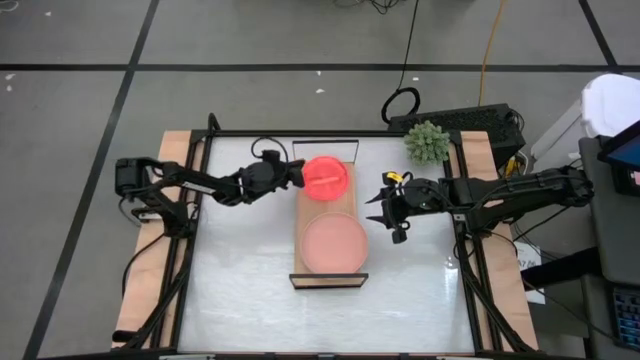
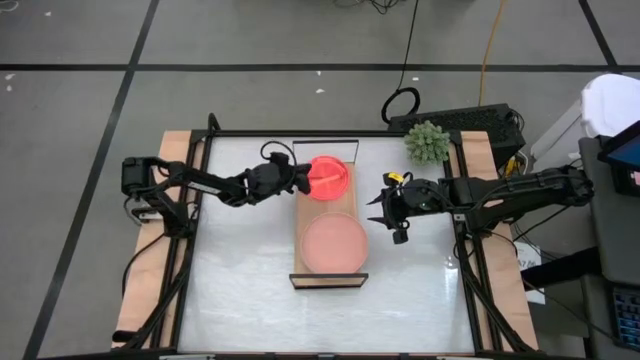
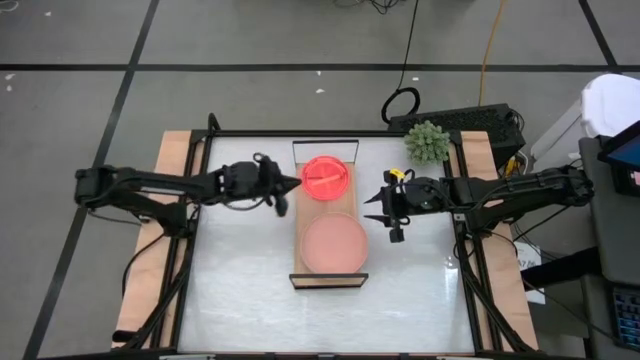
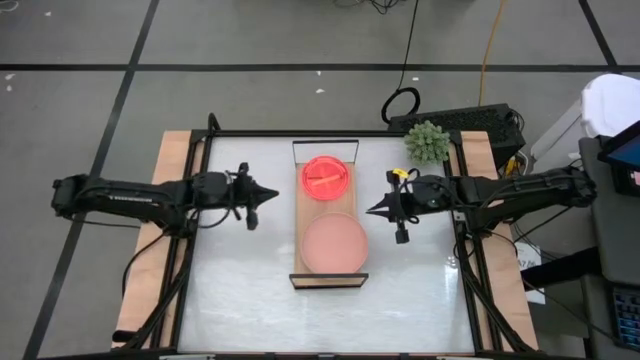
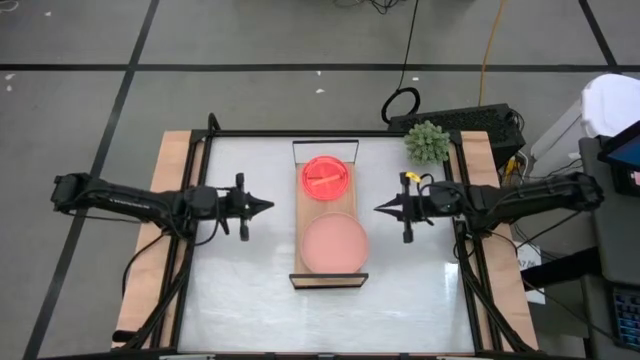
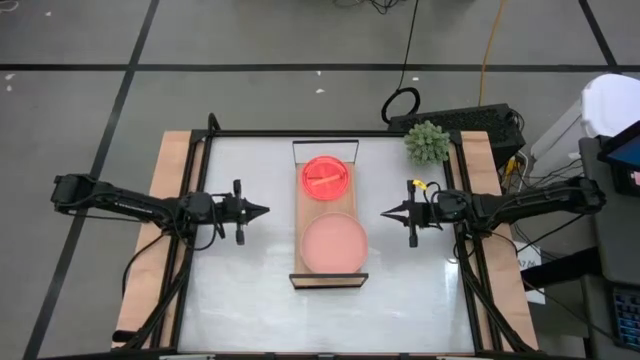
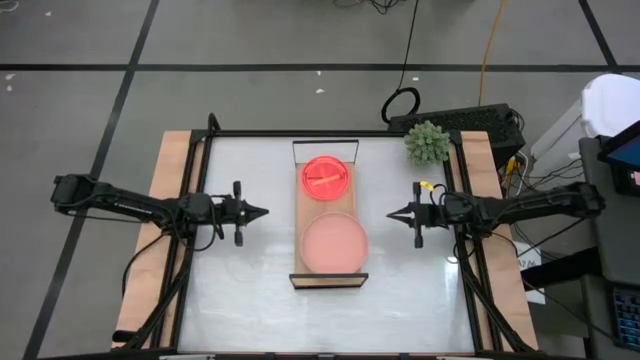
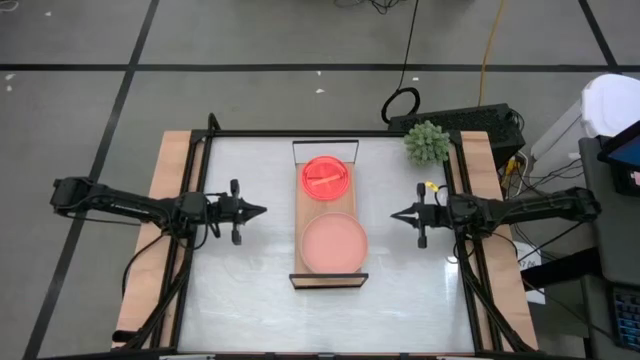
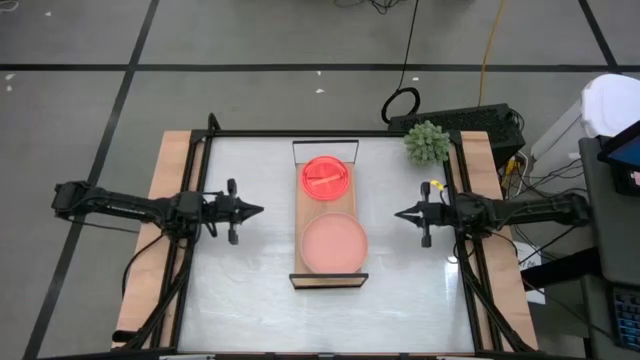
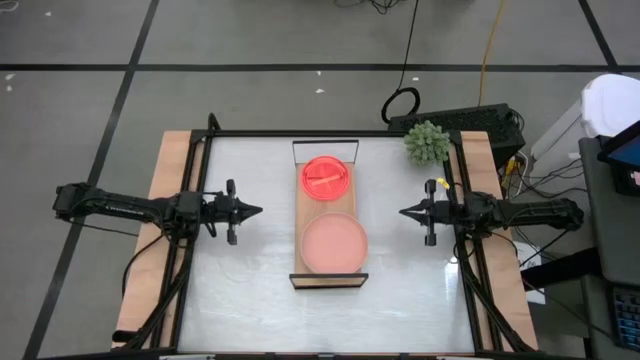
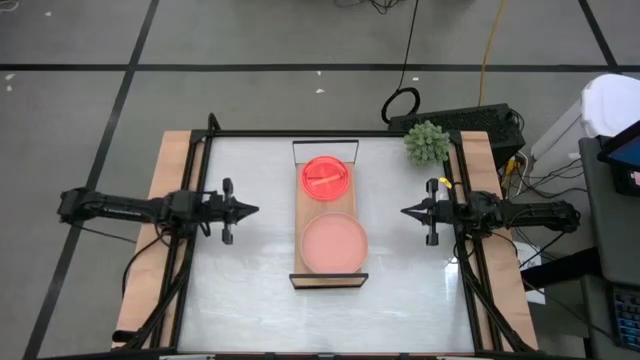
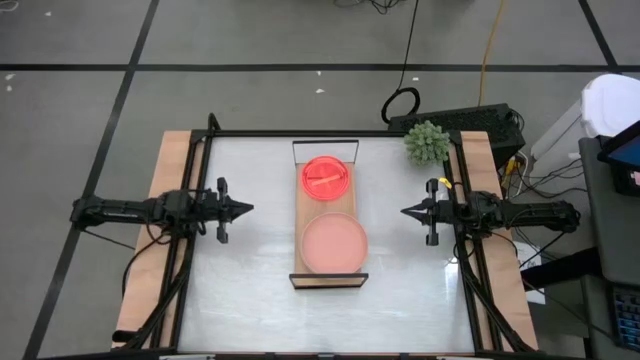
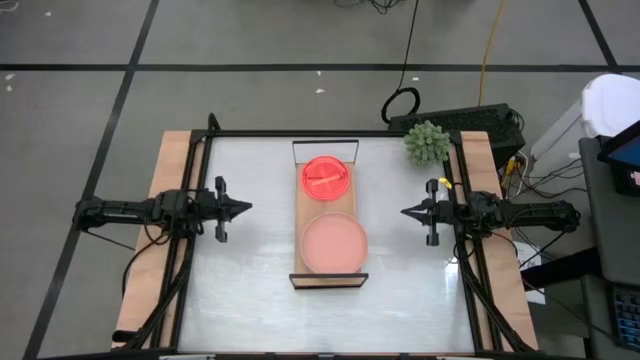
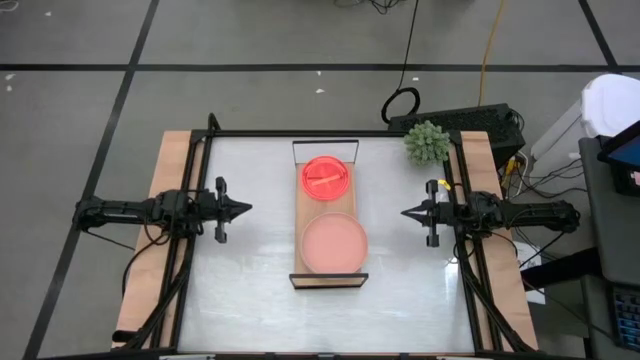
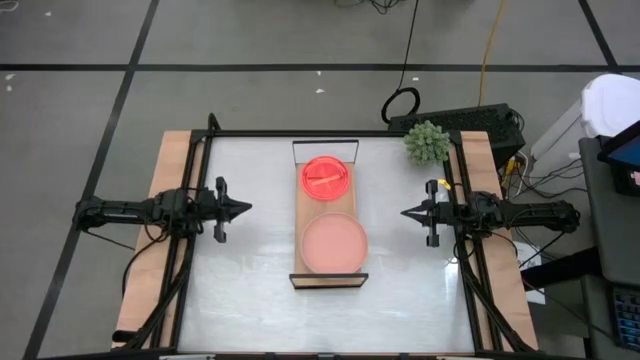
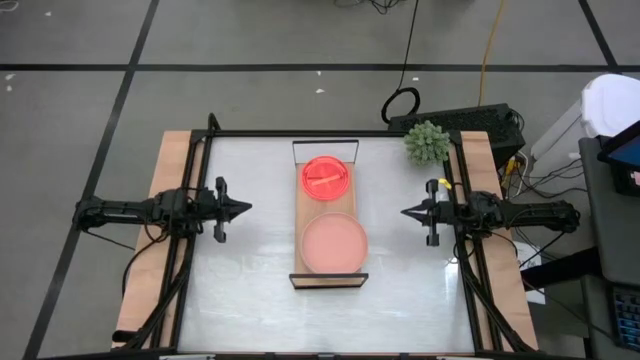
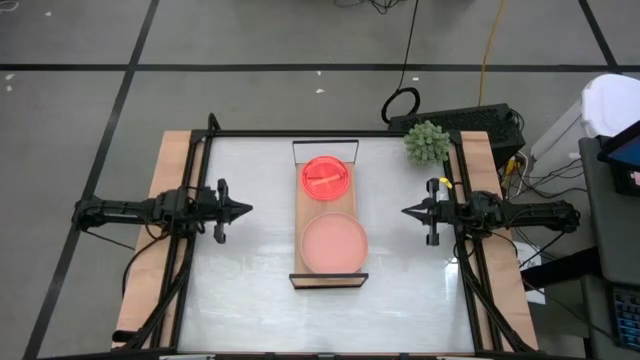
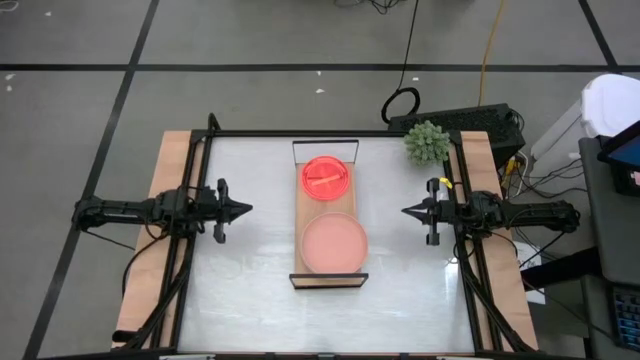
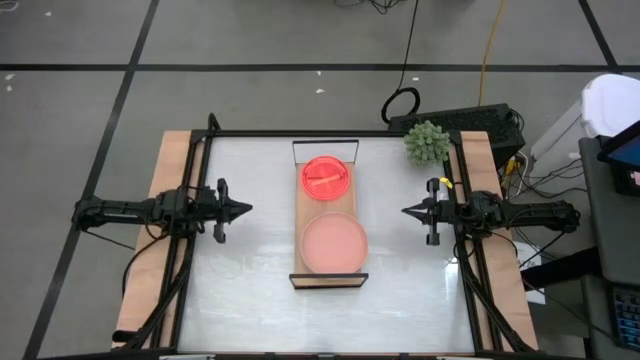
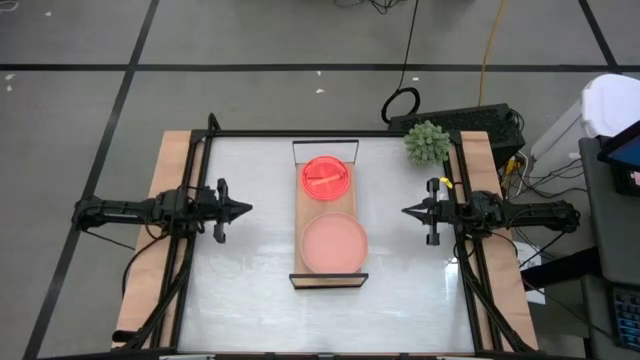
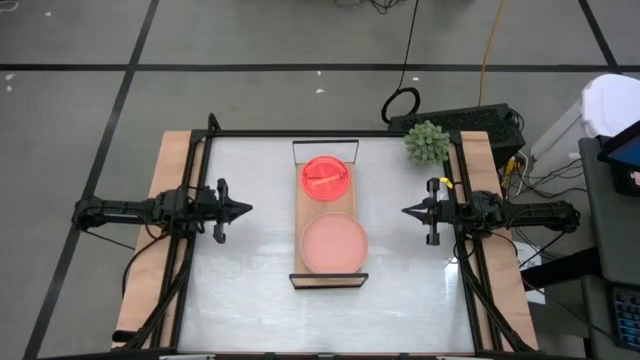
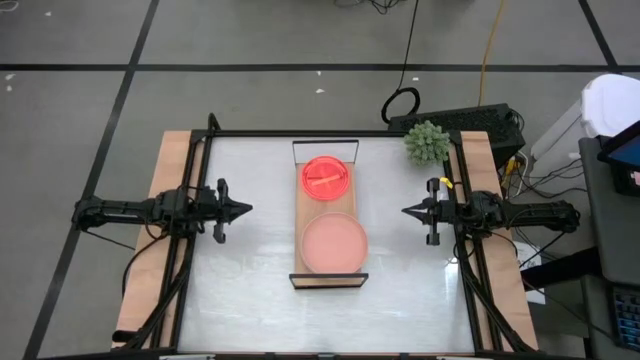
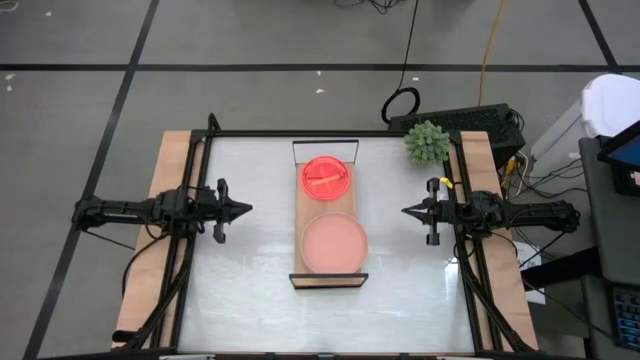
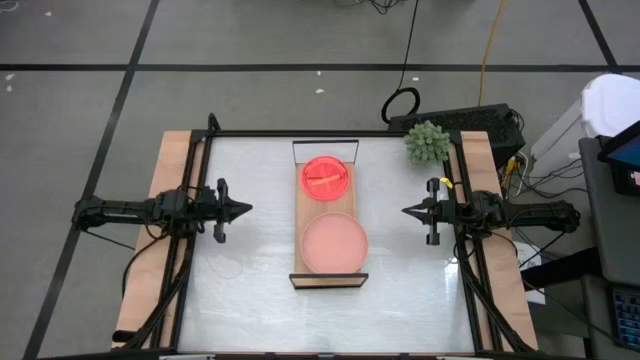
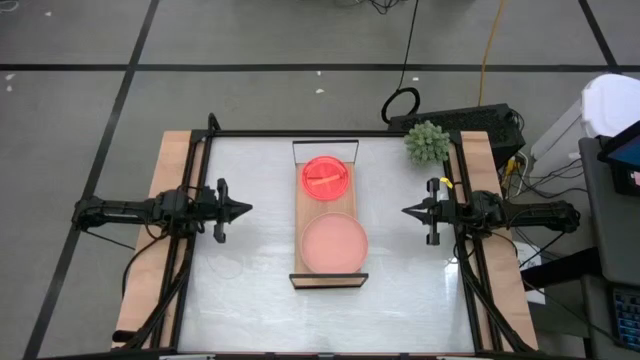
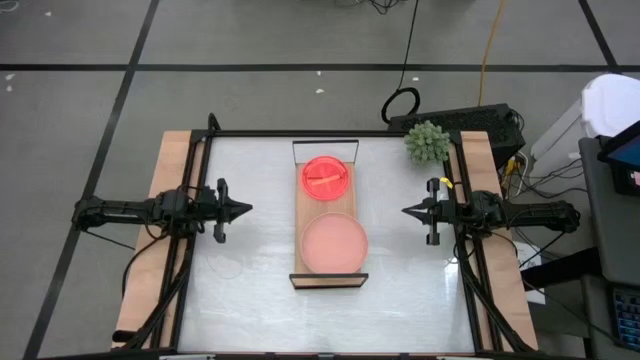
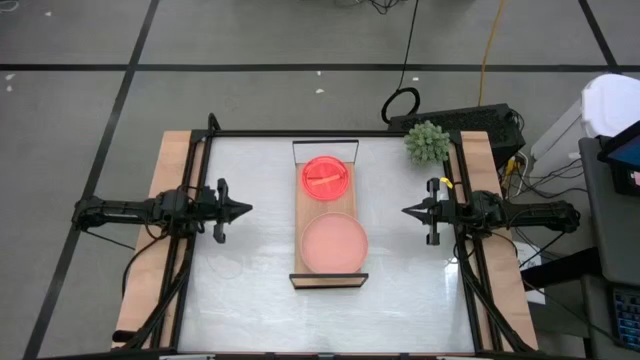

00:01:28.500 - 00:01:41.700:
Task: Place and stack plates onto a shelf
Return to Home Position

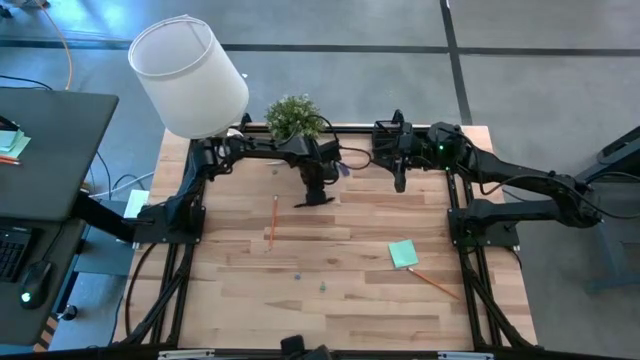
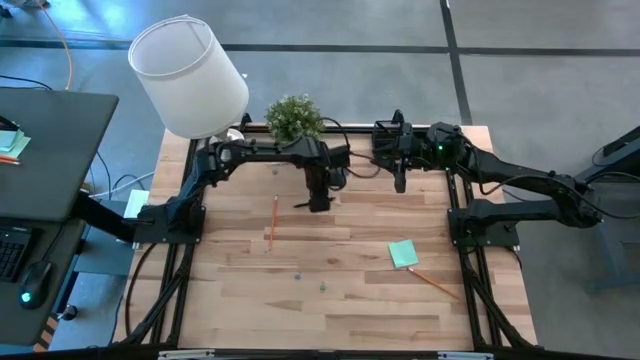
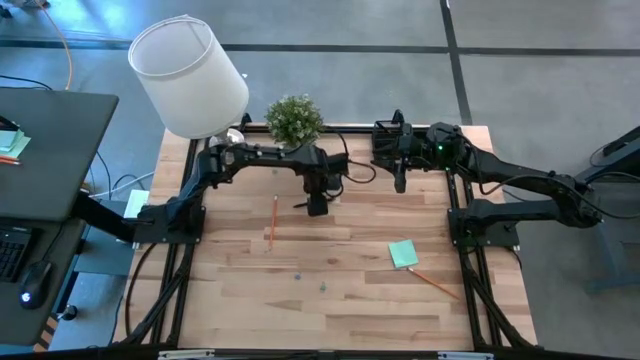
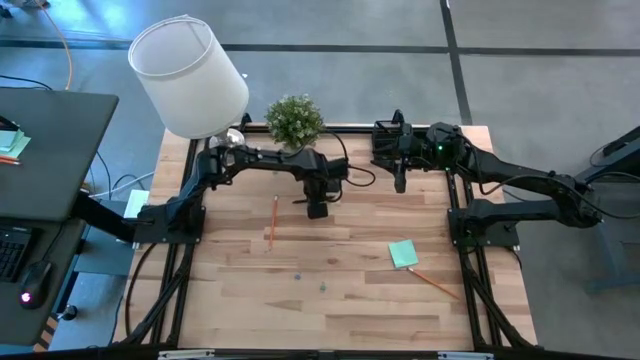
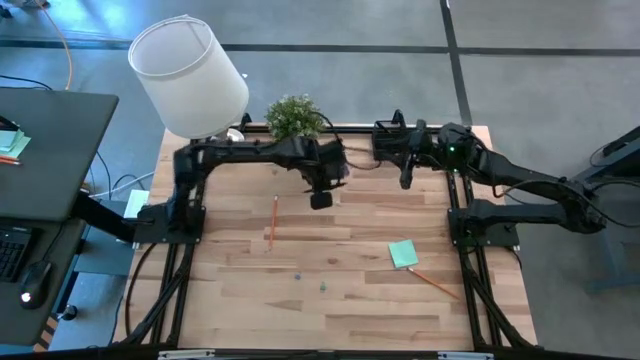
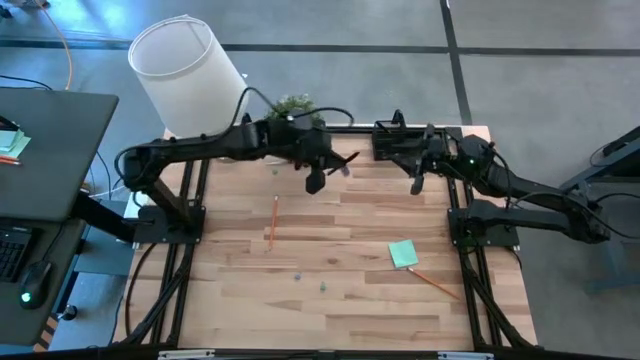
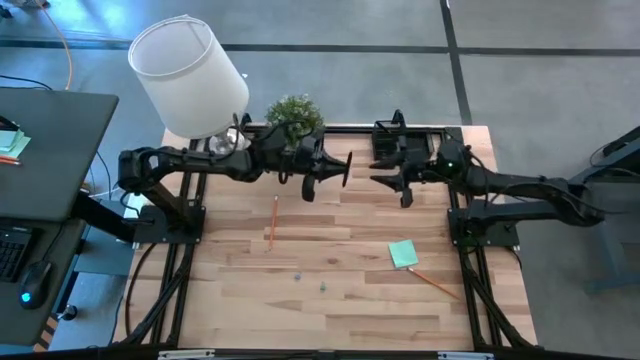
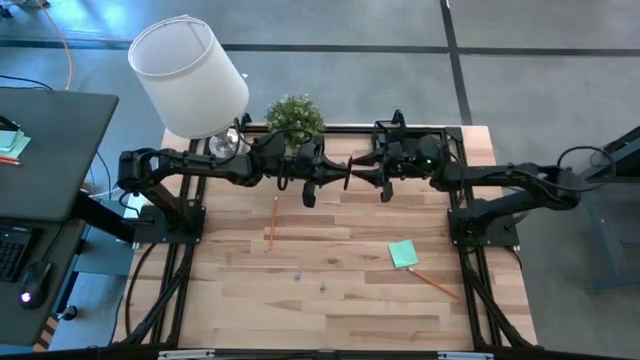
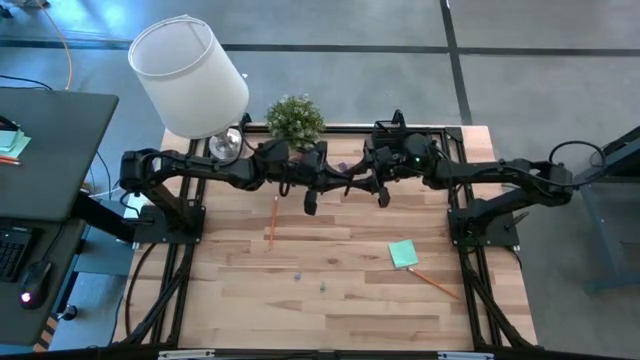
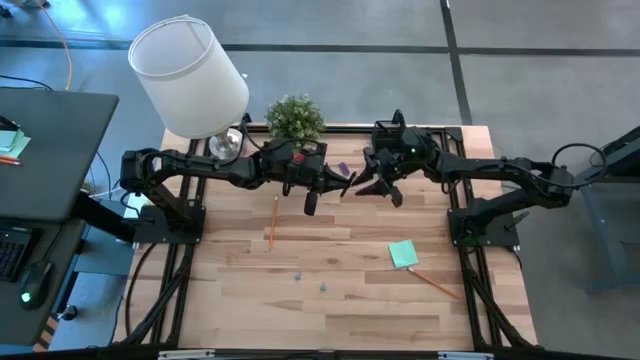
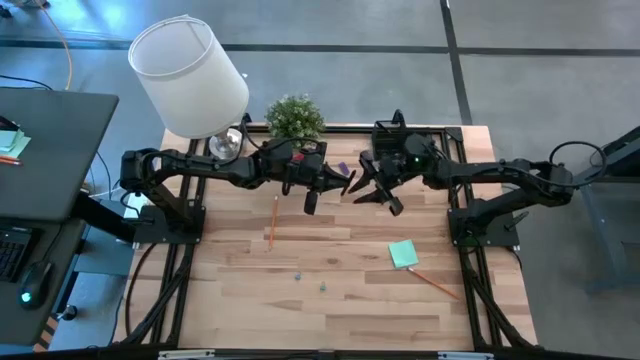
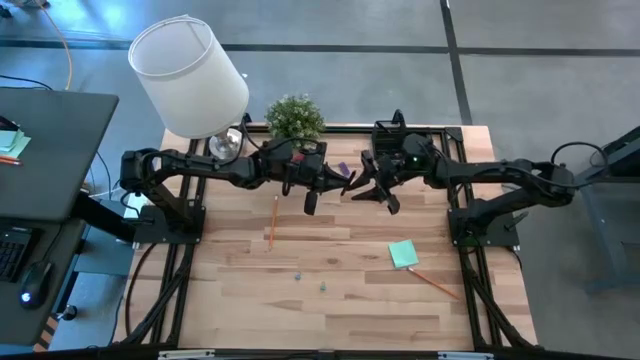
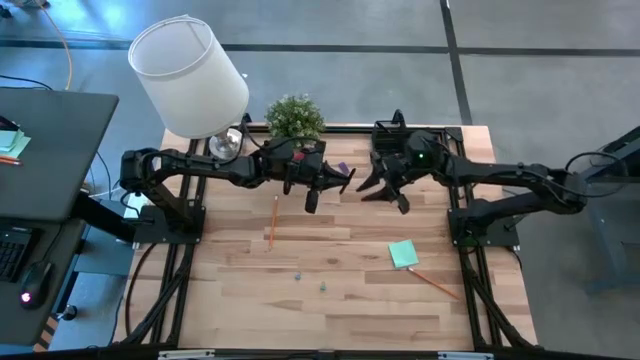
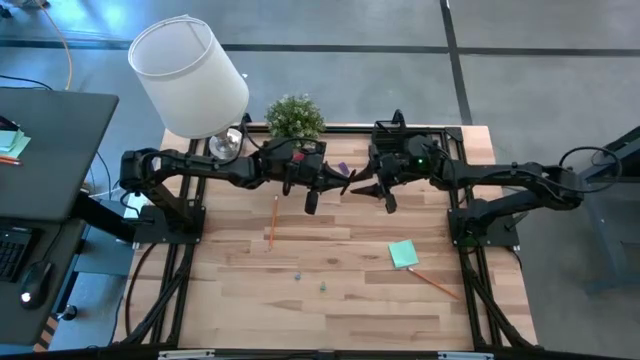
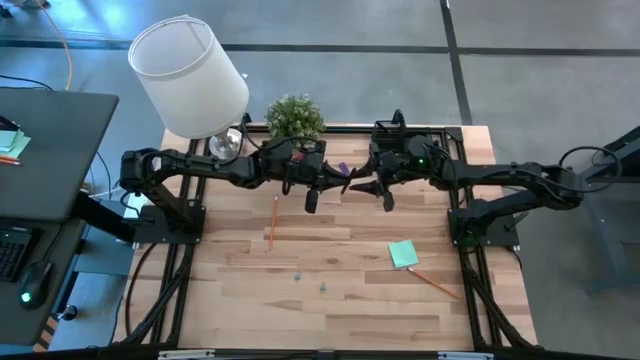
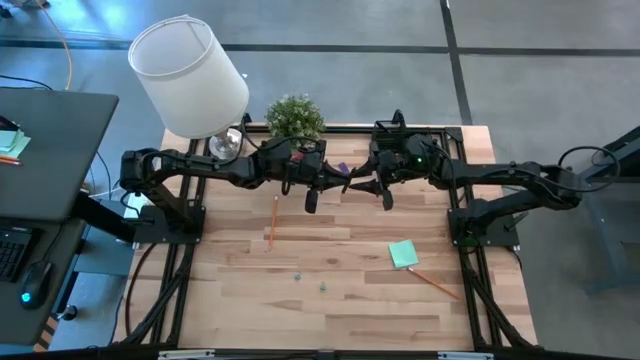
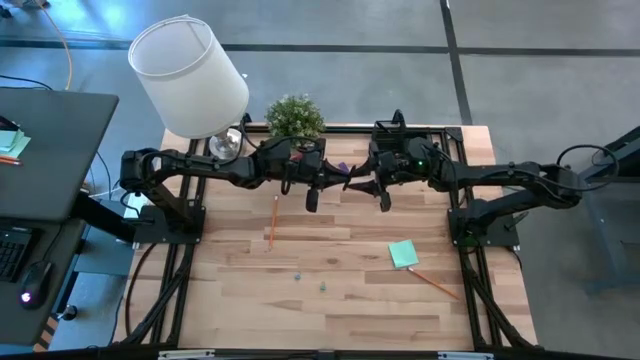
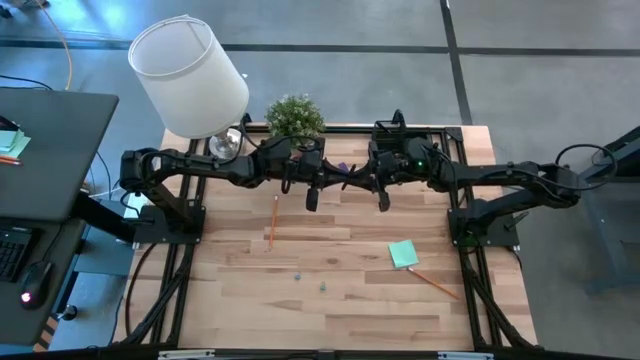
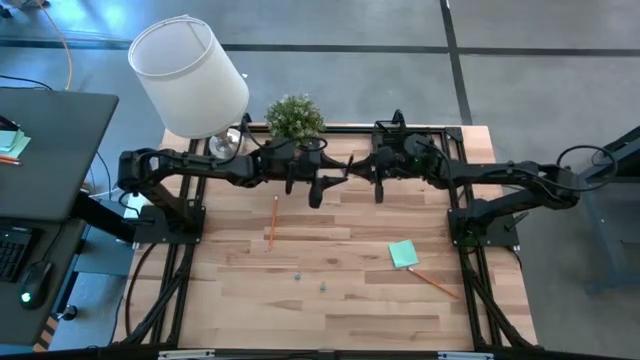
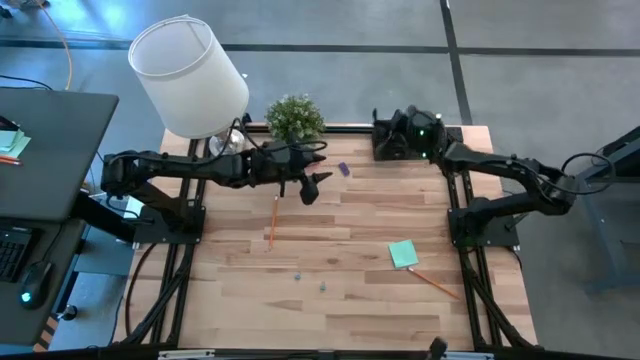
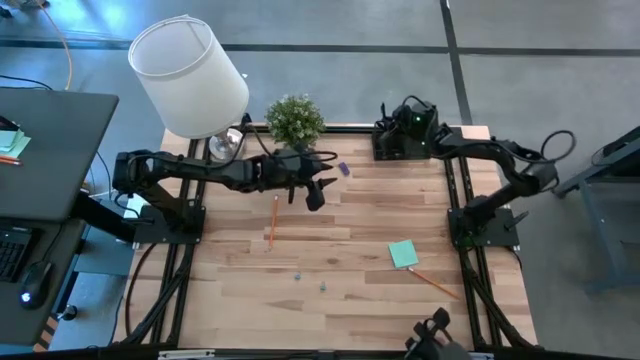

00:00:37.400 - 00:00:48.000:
Task: Pick and place office supplies into organizer
Put the black pen in the black desk organizer
